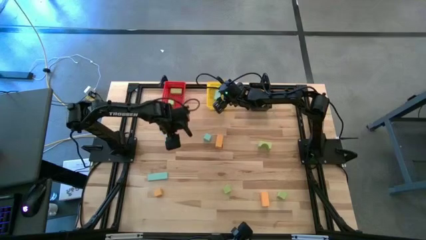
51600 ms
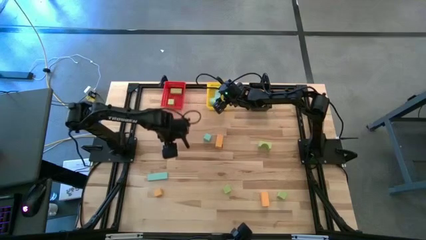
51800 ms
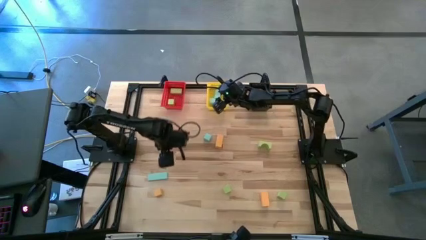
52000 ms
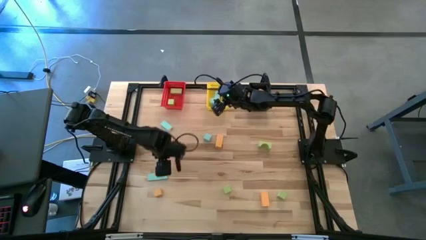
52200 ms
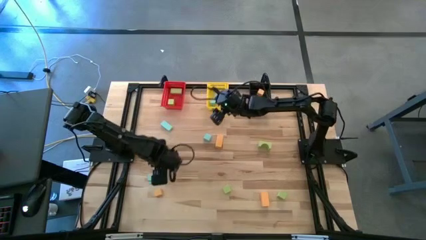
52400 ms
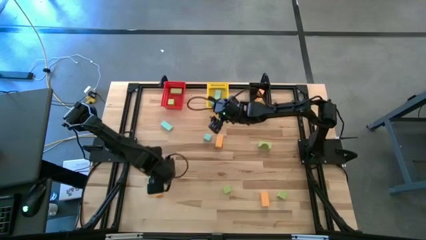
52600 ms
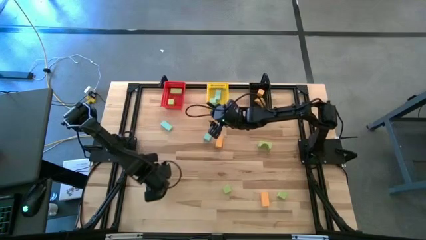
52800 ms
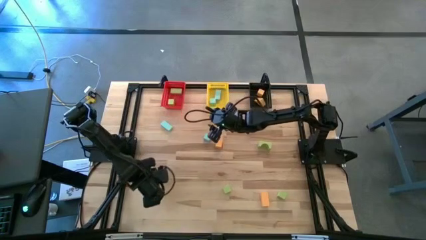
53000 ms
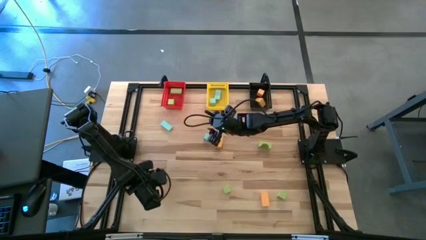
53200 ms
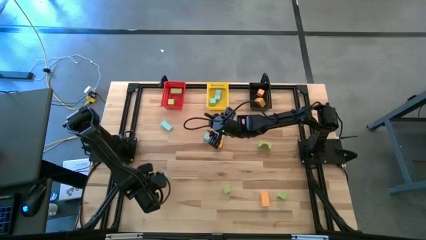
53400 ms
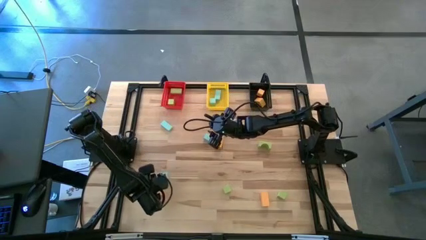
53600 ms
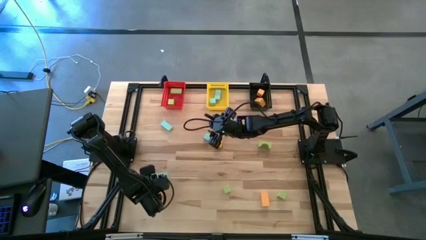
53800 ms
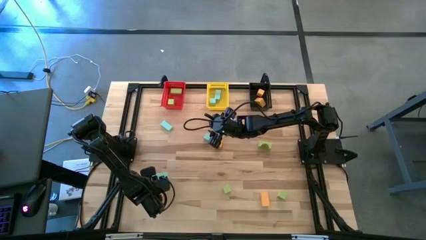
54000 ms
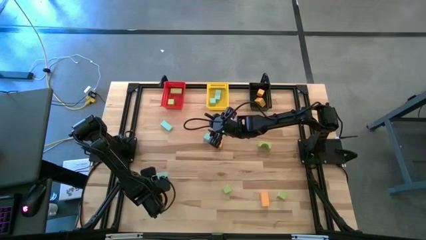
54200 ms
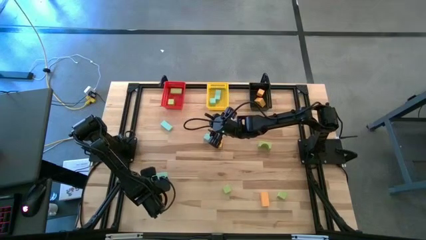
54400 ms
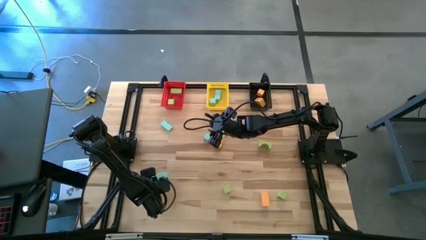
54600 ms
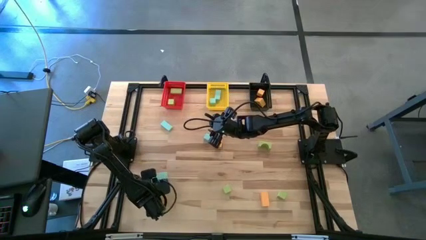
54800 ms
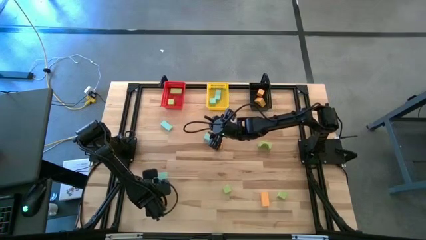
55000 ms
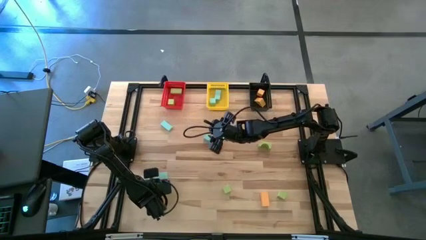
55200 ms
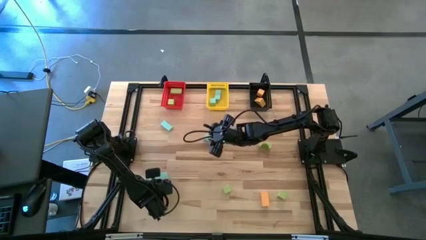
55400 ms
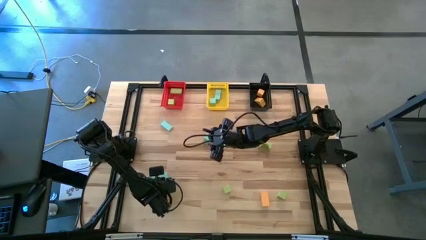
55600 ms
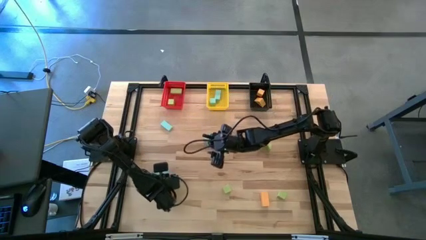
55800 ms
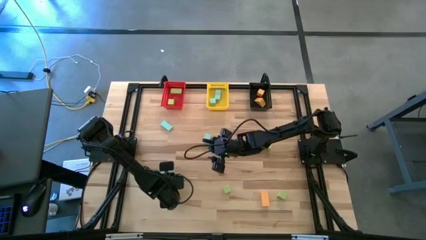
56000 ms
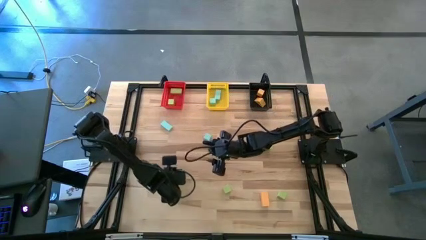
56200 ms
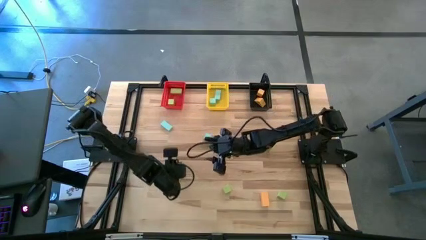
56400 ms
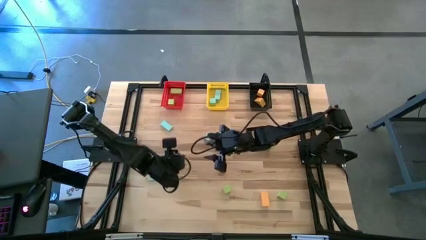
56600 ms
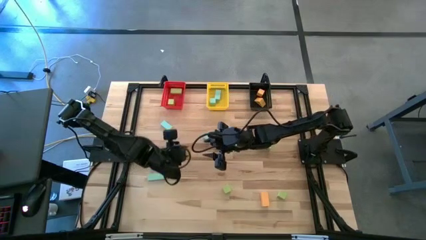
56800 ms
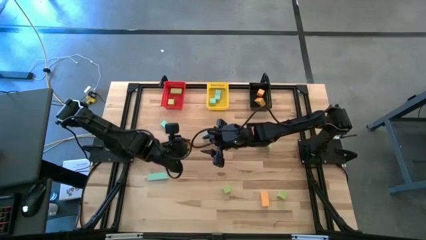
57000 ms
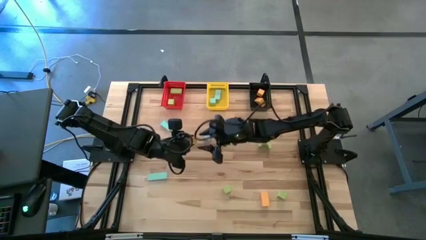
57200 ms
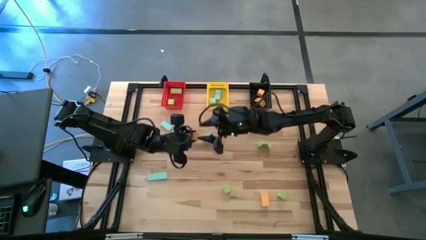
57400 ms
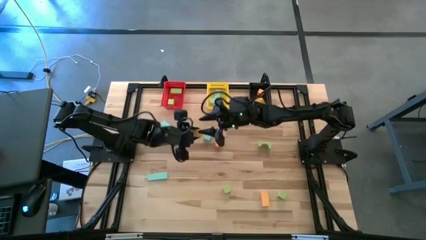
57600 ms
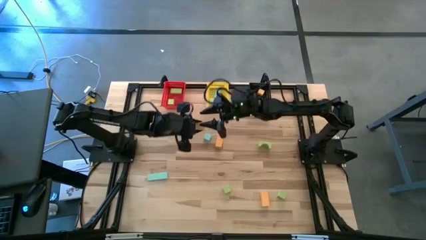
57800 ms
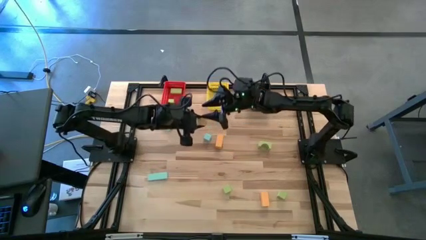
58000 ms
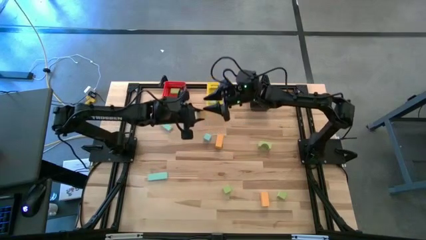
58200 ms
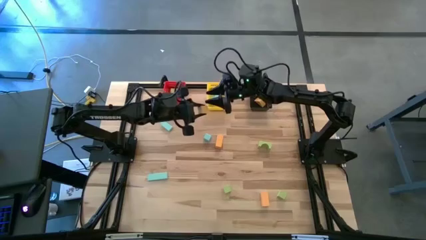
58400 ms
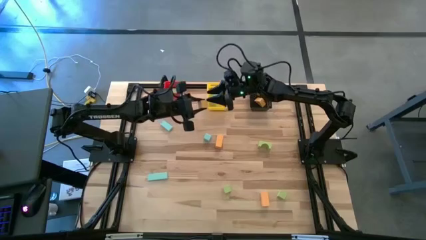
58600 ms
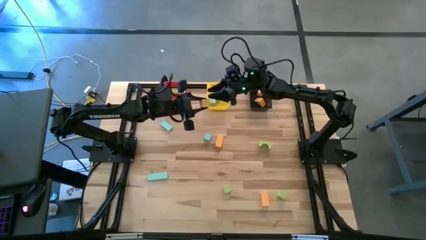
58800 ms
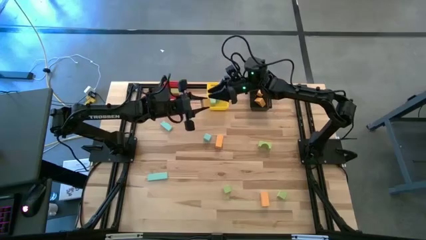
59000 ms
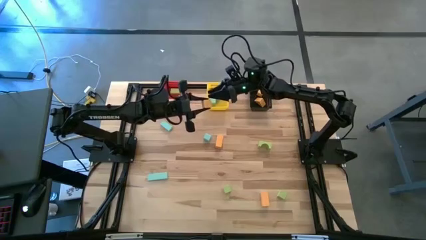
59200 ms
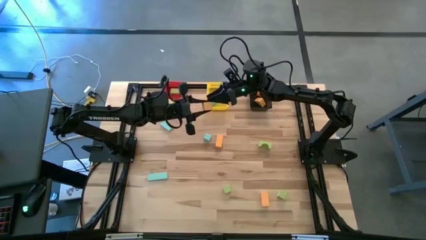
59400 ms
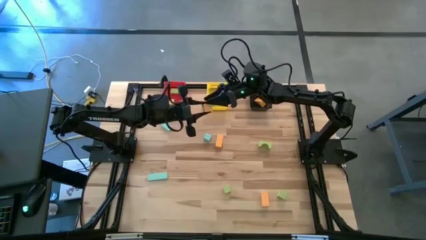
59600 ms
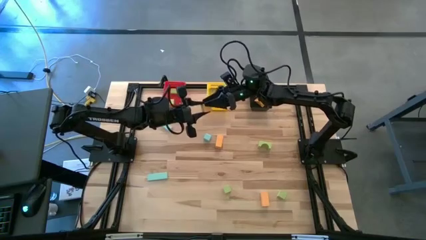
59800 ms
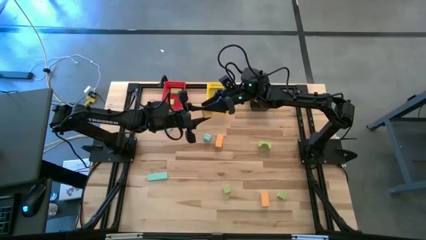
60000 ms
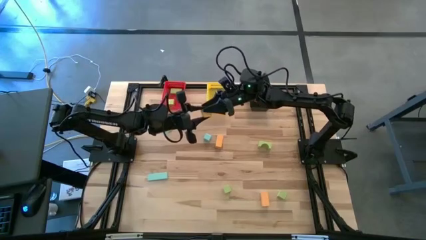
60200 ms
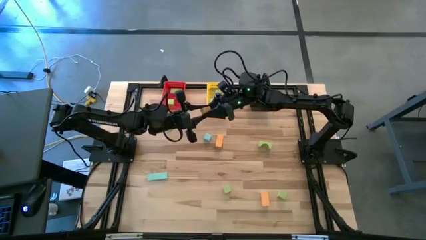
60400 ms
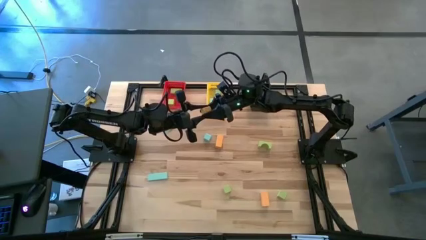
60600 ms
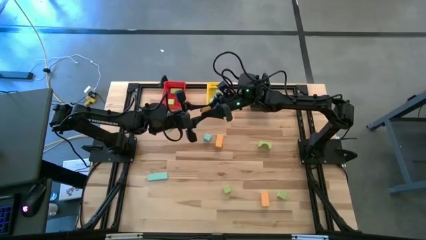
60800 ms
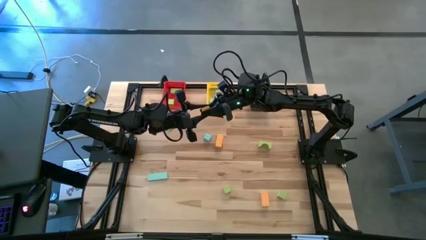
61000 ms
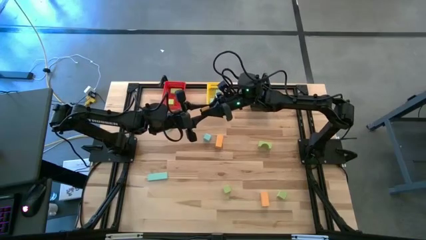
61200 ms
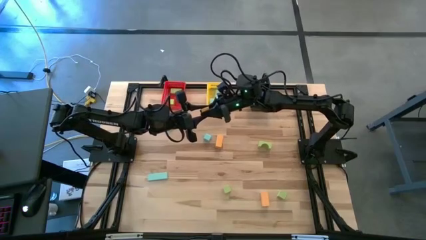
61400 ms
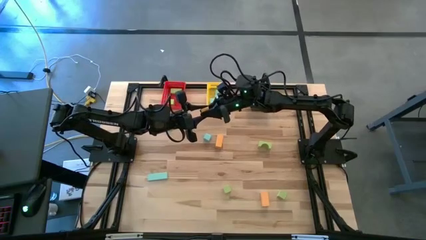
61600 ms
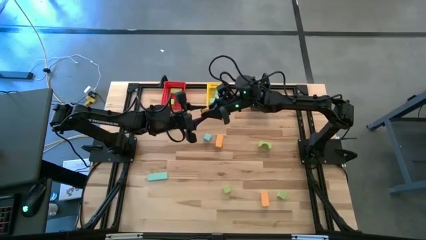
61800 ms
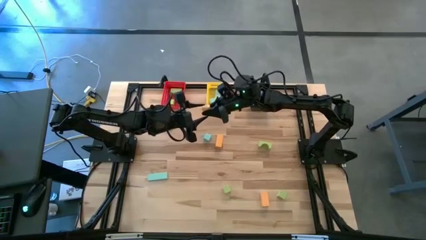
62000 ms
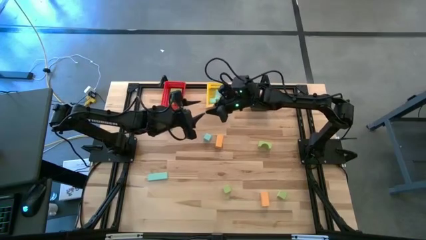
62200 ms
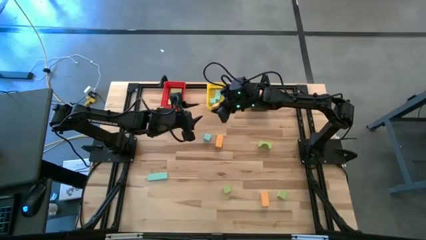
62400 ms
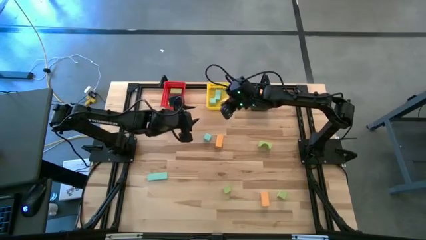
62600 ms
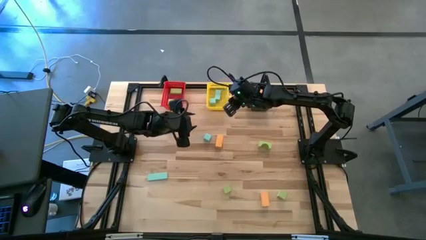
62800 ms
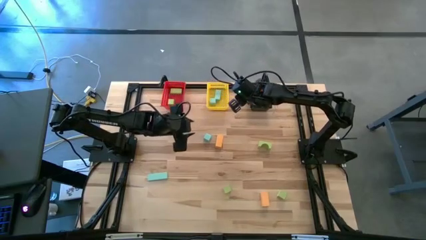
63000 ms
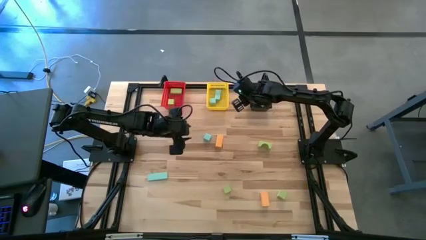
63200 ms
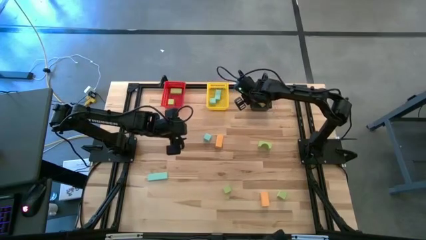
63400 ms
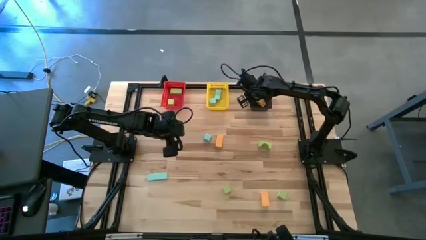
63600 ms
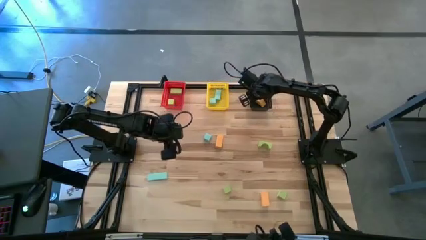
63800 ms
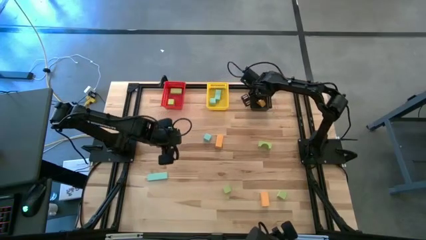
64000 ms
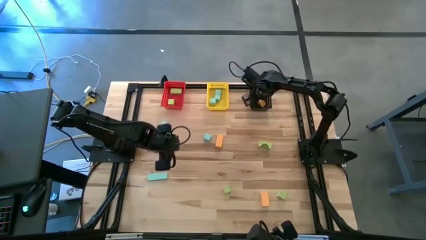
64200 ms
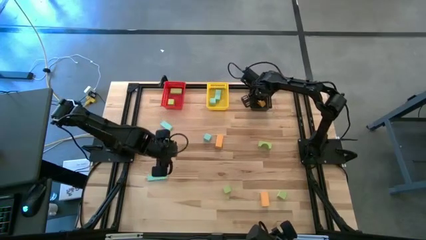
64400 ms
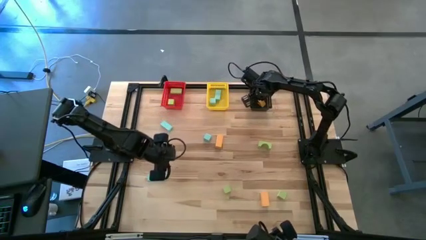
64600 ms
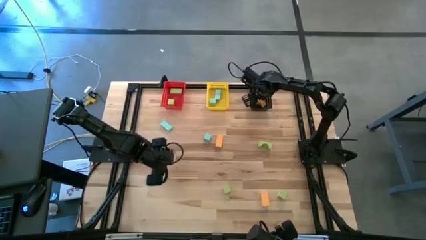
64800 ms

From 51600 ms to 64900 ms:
Task: Sort & place blocks by color
Put the yellow block into the black bin

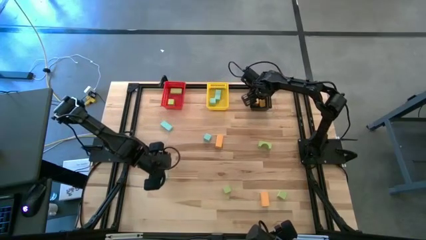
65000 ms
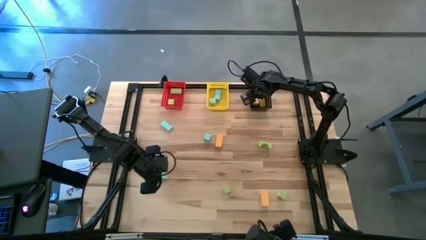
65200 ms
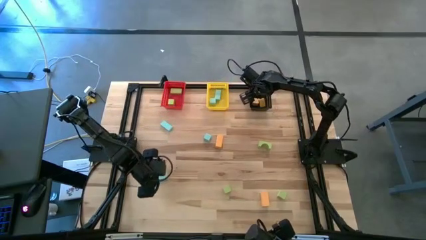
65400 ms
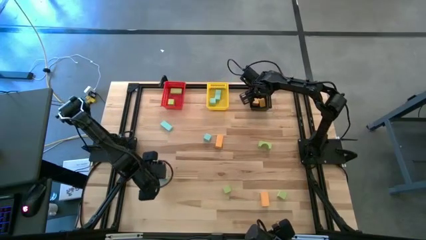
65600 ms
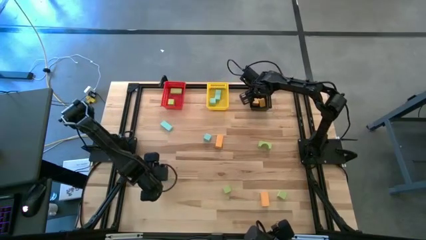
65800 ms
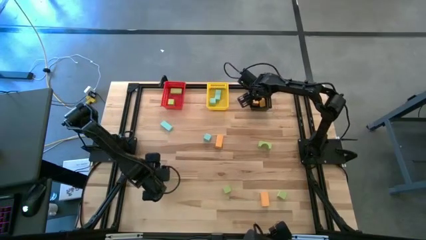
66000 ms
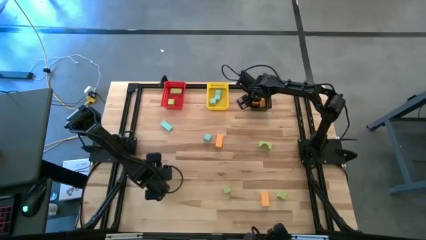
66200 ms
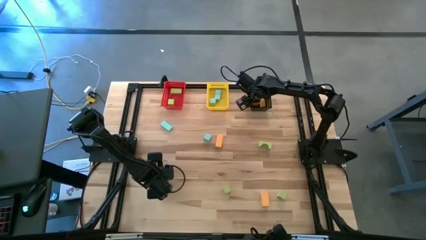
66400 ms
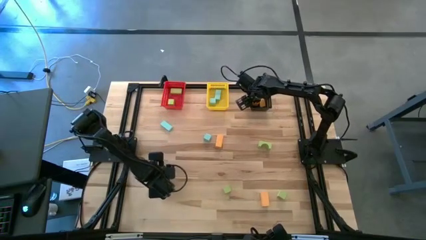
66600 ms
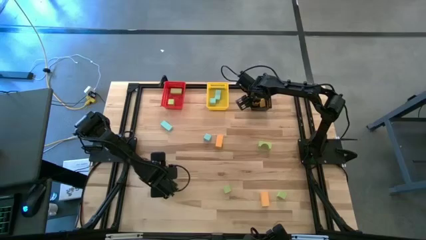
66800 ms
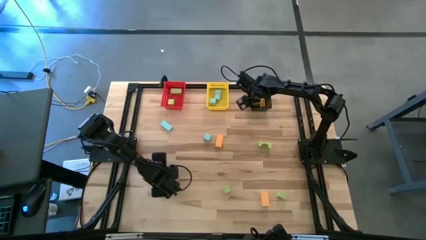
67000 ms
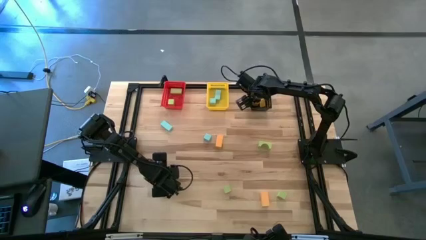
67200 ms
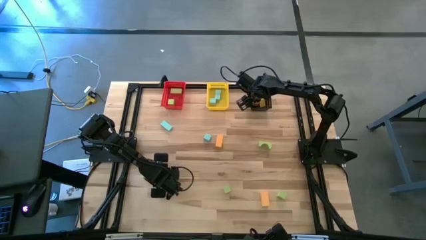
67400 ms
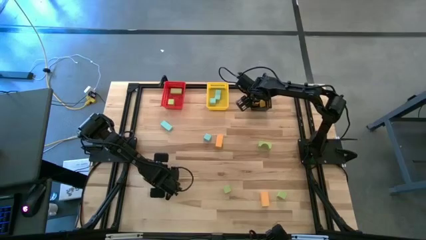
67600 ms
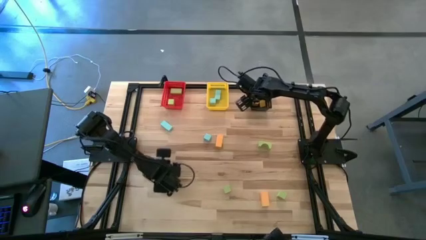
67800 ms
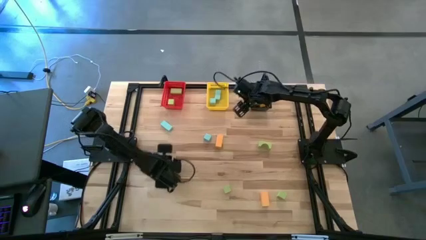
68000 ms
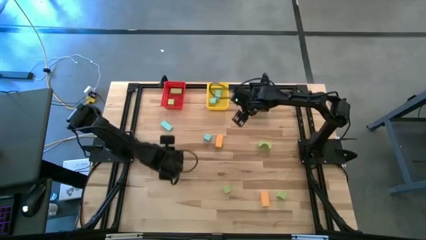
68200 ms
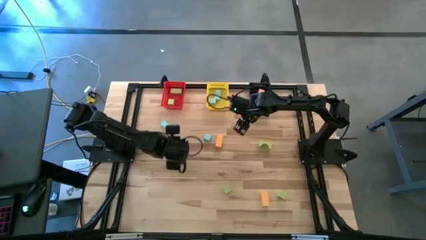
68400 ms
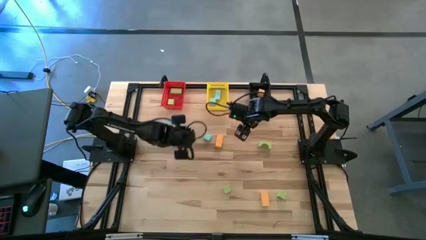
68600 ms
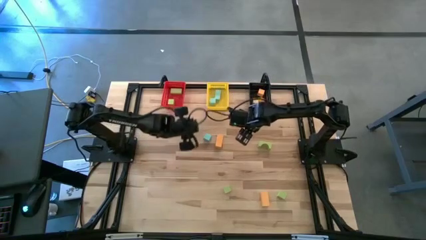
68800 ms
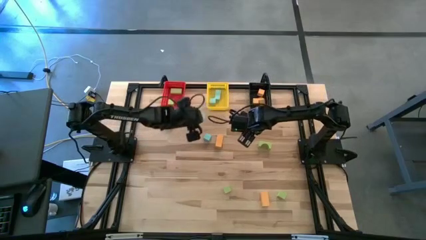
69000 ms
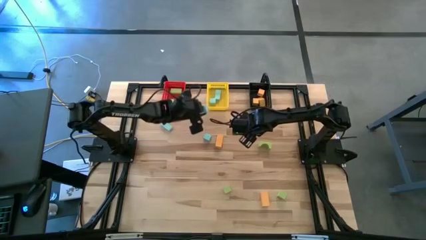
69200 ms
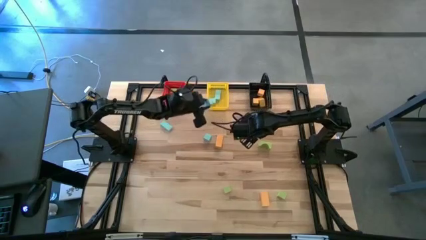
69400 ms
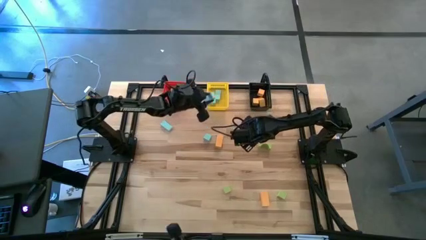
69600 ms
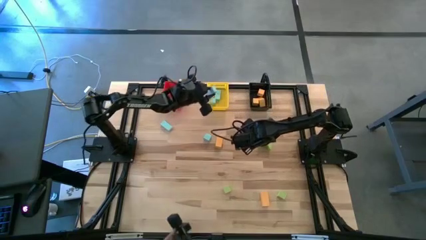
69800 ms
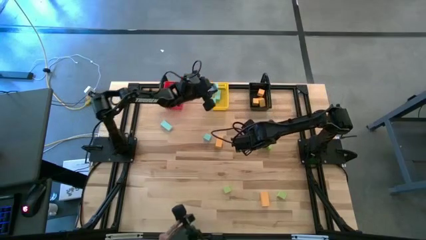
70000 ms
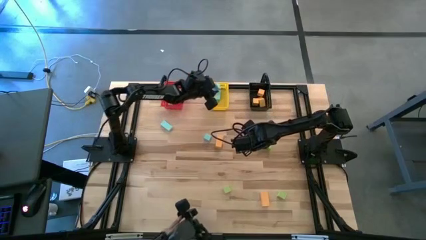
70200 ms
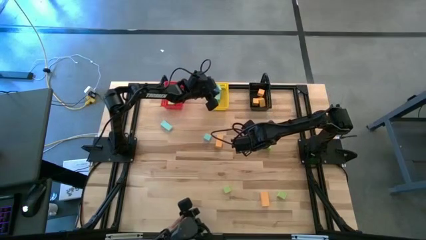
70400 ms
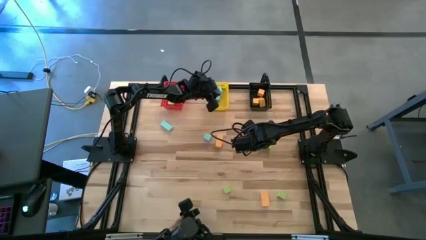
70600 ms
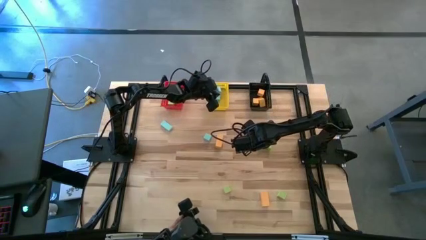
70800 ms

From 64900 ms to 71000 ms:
Put the blue block into the yellow bin
